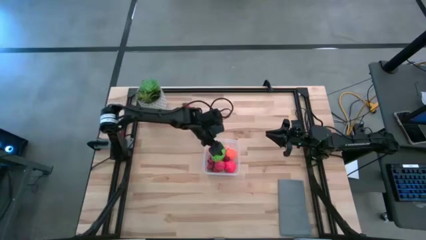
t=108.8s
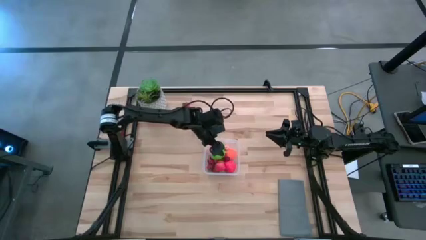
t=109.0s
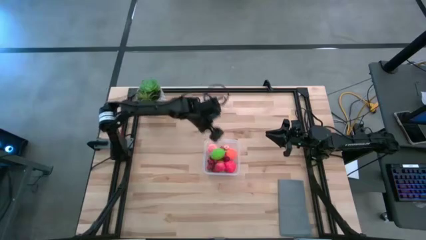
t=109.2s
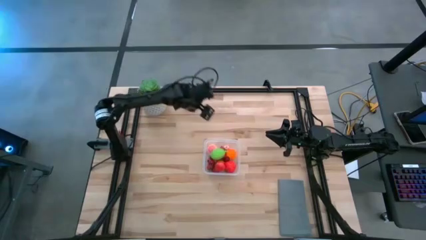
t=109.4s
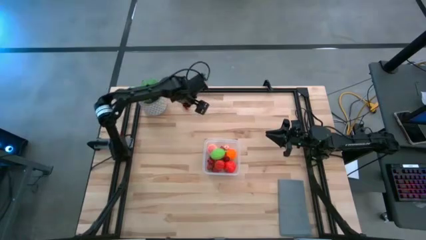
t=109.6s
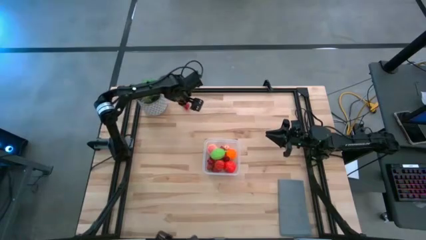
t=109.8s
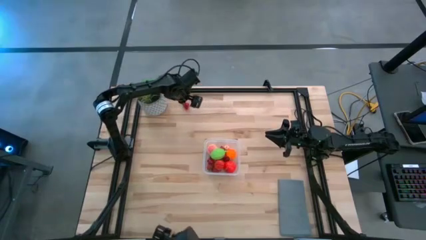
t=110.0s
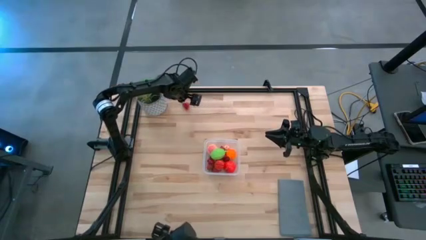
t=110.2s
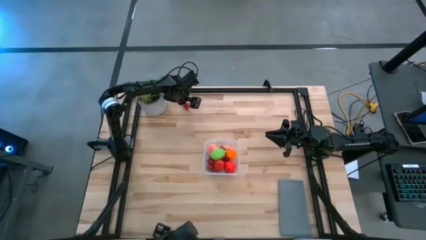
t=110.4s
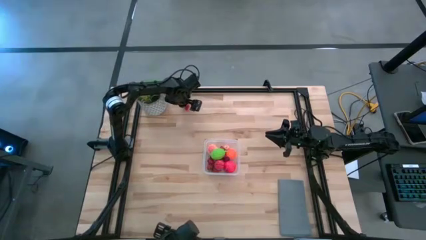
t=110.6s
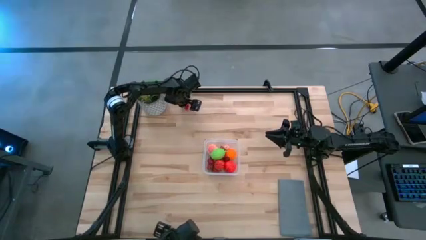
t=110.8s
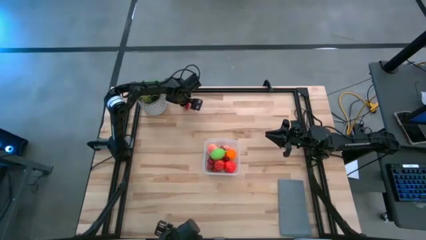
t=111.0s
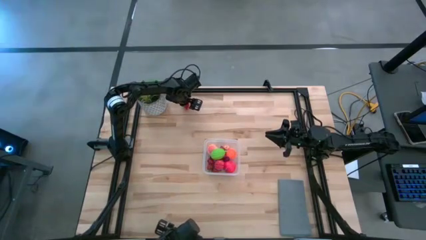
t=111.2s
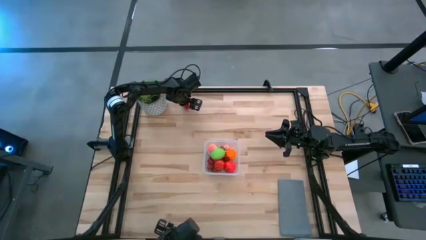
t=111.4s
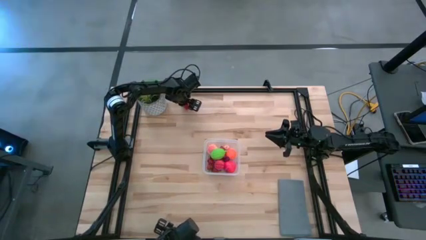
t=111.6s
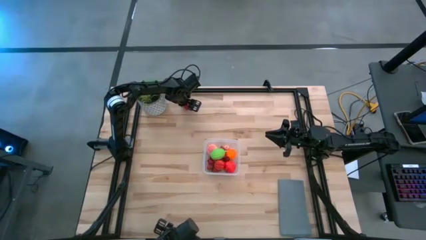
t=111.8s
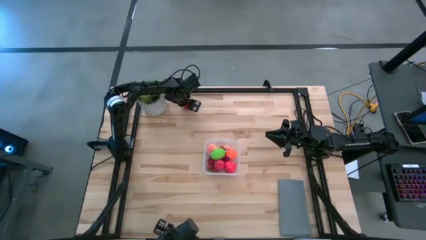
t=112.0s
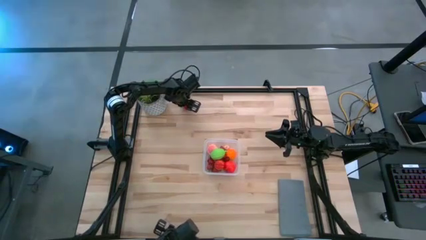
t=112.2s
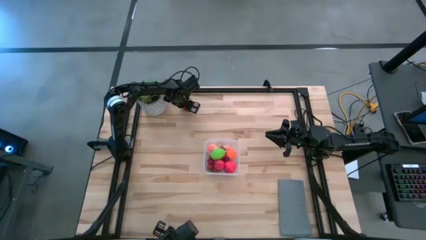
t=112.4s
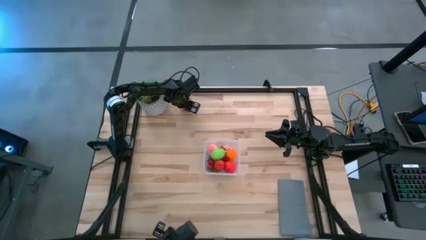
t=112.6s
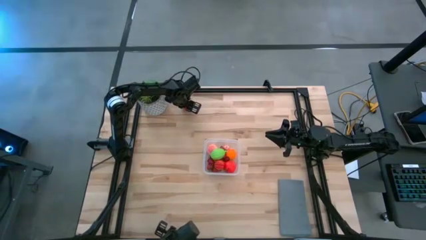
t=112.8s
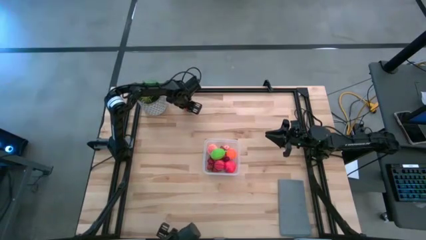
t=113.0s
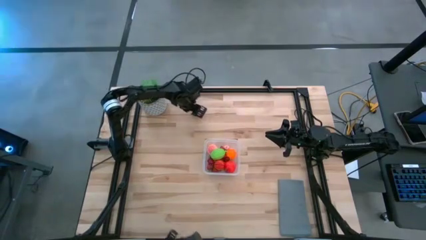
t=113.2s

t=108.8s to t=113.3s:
Task: Pick and placing Produce into tupperware
Put the red strawberry into the transparent container

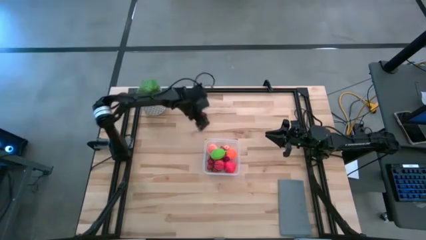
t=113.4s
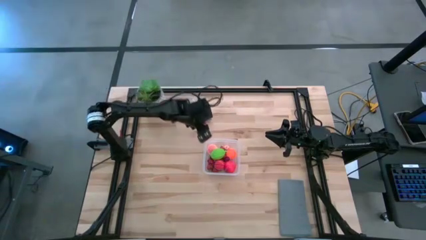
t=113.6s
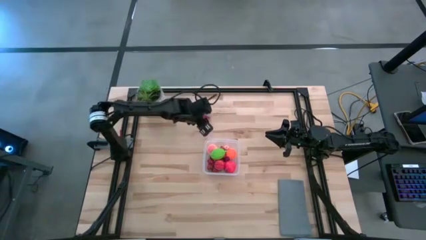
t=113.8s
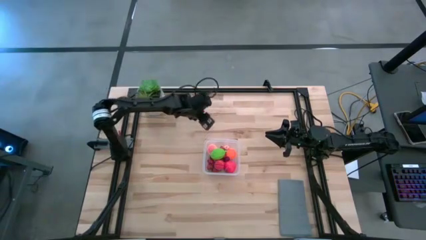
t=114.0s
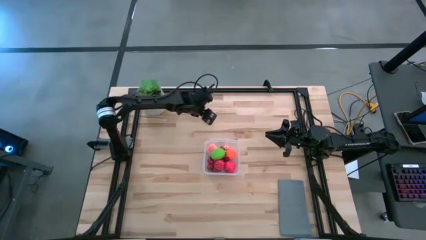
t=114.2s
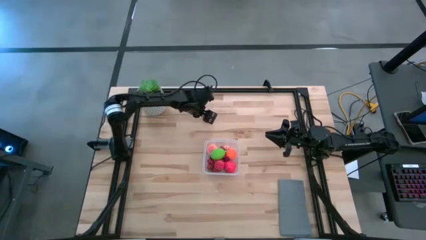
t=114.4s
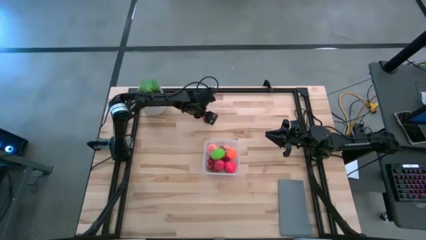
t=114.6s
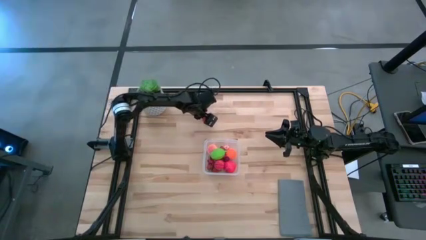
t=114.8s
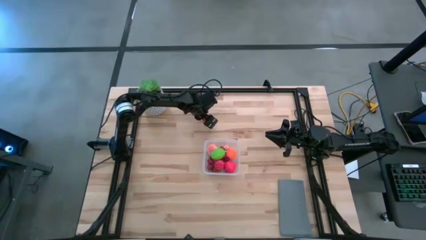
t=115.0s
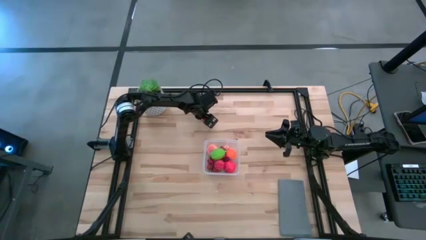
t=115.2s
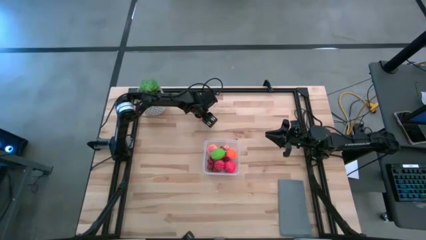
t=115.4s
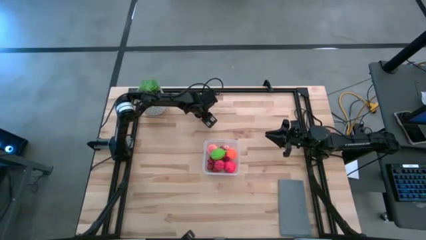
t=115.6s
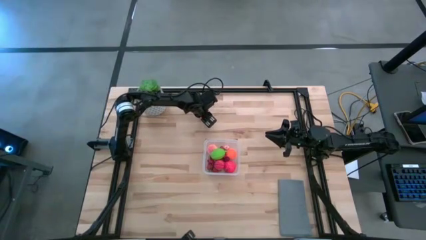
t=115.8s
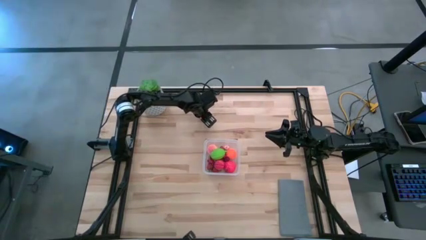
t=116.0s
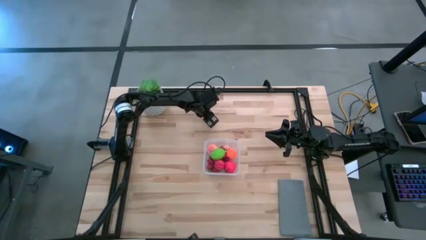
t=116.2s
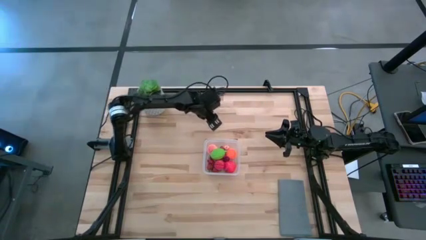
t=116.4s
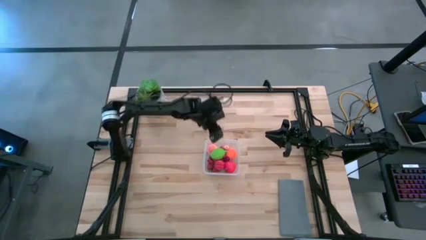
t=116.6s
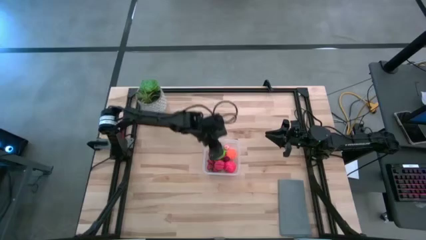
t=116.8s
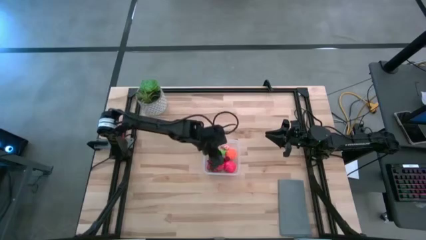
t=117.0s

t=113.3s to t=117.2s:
Put the red strawberry into the transparent container

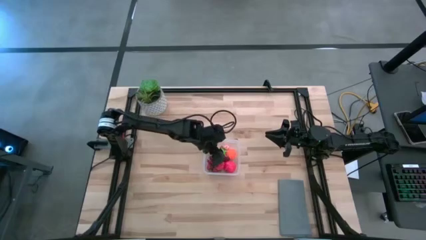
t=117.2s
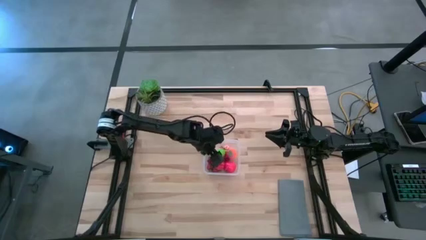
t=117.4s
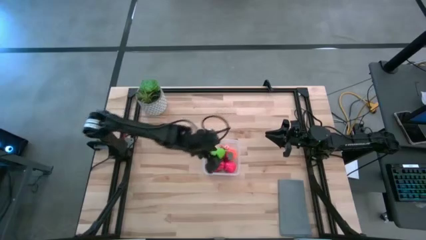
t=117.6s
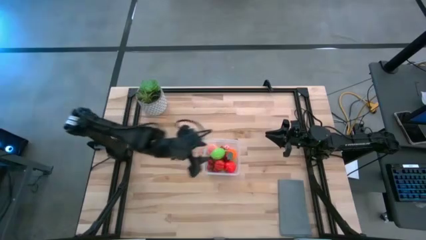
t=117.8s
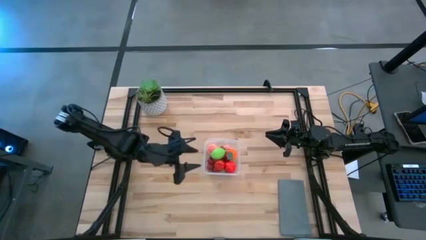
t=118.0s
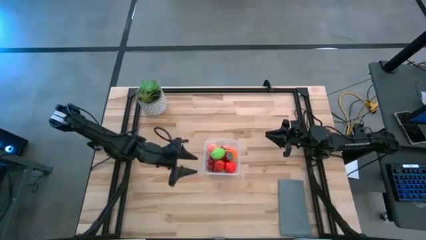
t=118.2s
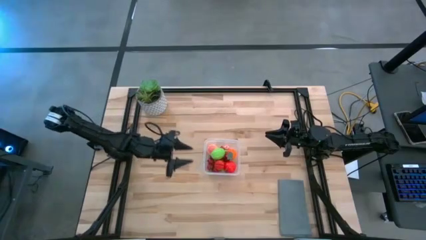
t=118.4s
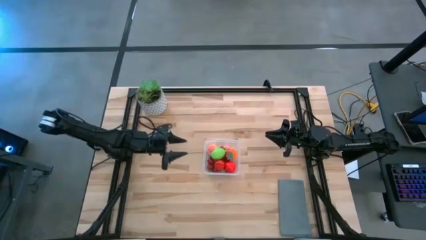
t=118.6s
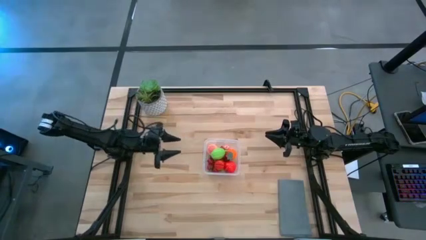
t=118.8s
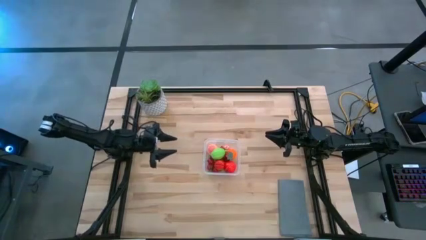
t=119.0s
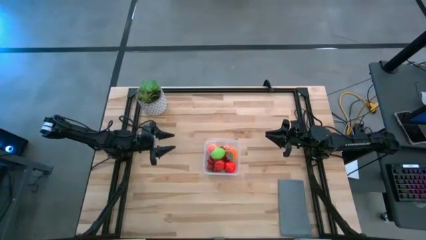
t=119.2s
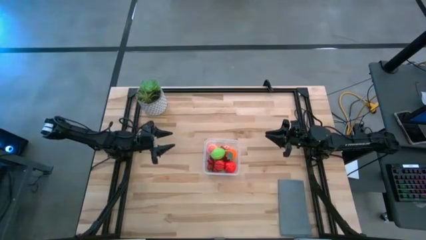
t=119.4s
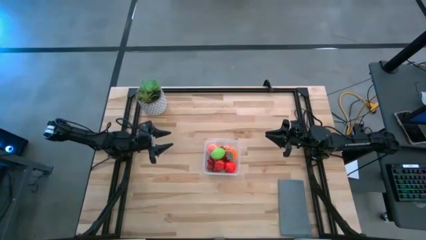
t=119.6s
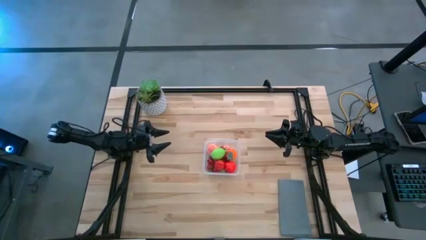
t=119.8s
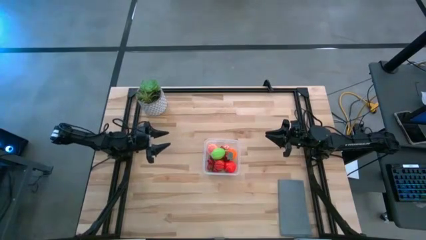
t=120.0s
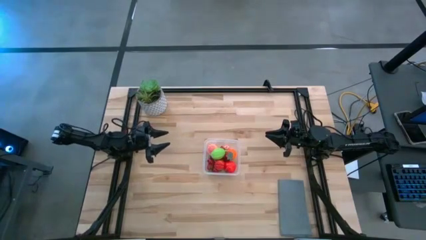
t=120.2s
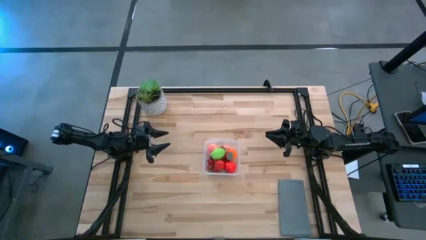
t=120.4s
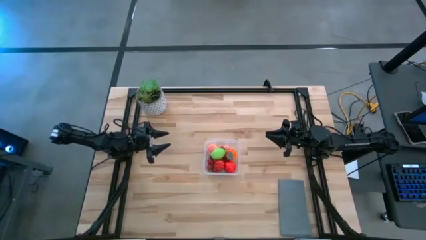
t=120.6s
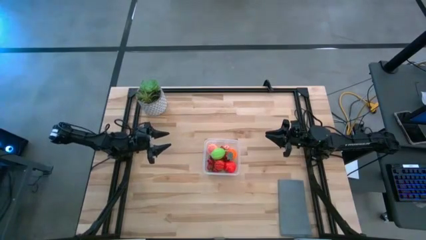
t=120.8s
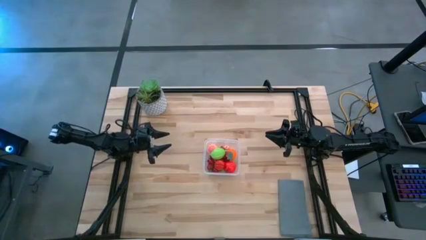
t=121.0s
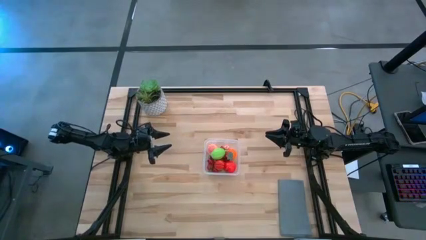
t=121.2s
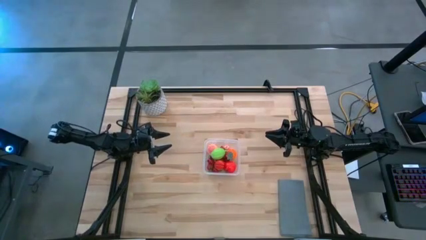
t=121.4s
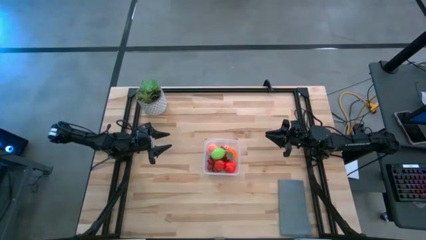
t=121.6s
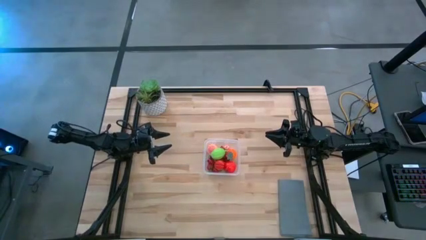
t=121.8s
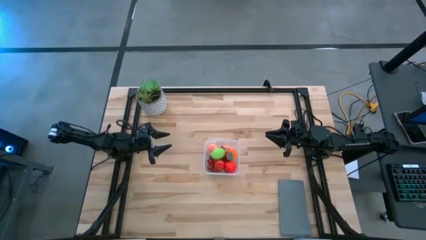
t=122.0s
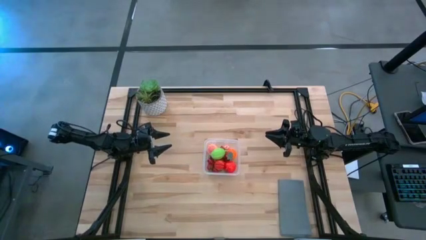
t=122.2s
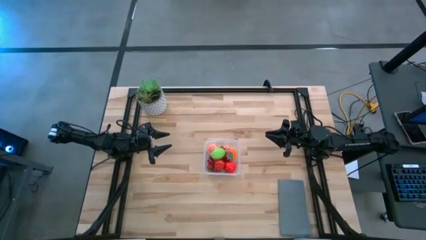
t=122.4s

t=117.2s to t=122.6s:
Return to Home Position

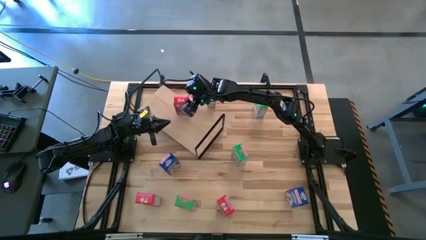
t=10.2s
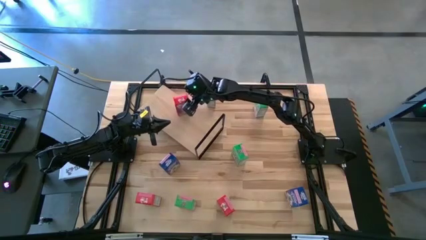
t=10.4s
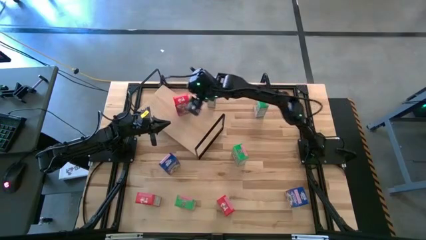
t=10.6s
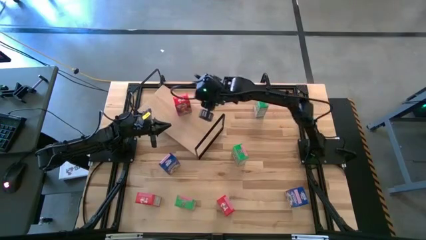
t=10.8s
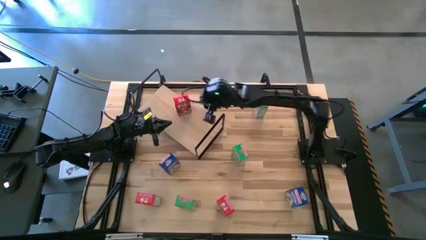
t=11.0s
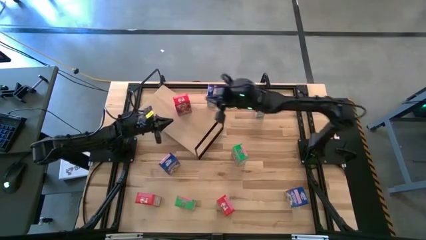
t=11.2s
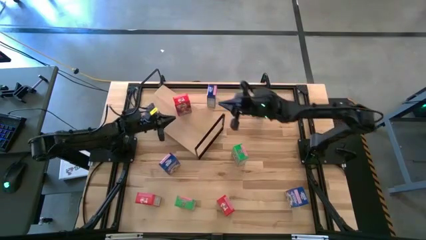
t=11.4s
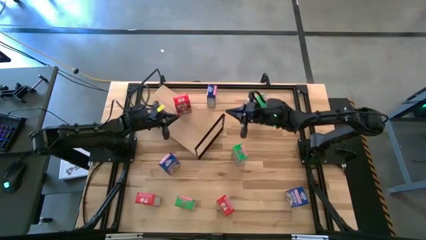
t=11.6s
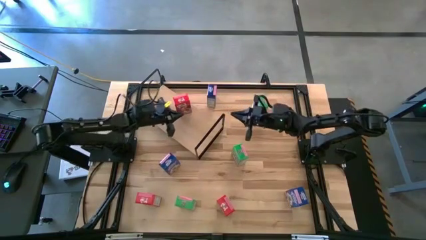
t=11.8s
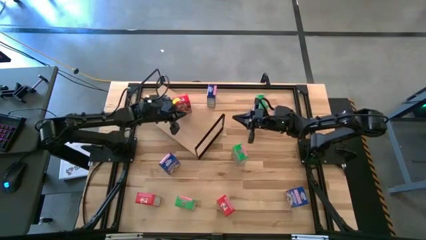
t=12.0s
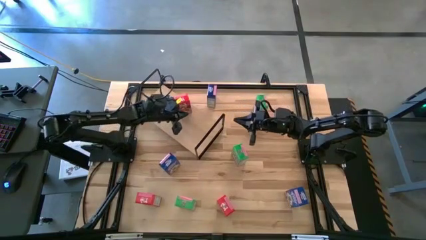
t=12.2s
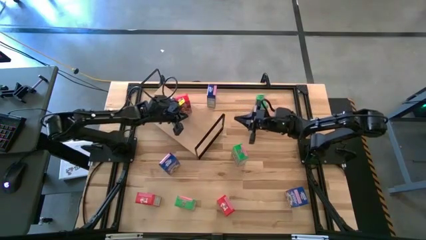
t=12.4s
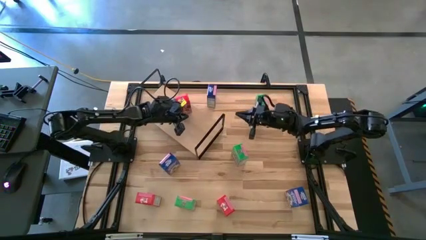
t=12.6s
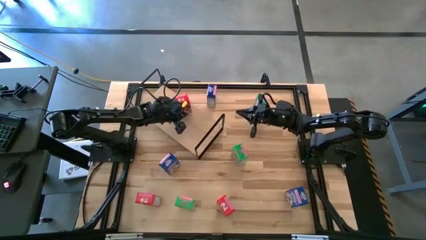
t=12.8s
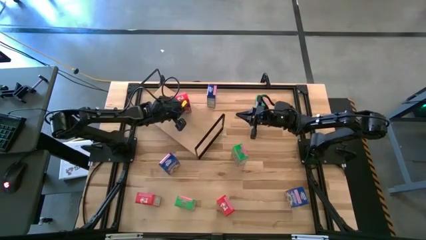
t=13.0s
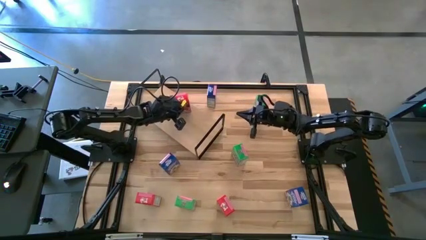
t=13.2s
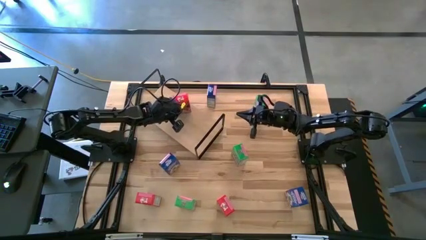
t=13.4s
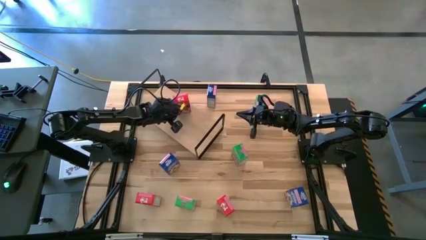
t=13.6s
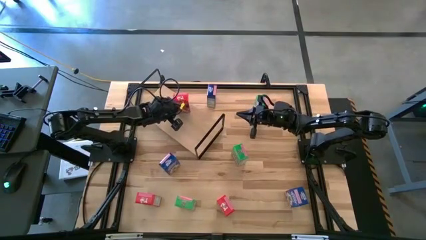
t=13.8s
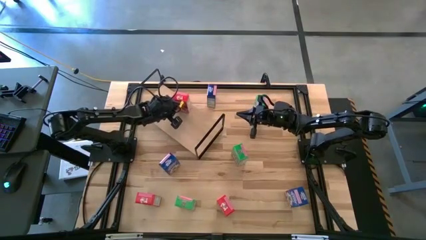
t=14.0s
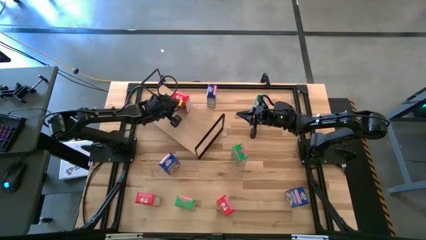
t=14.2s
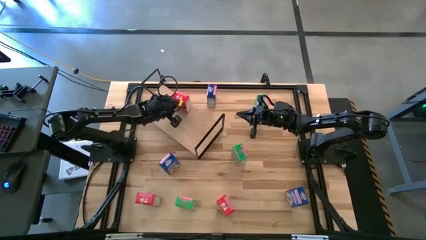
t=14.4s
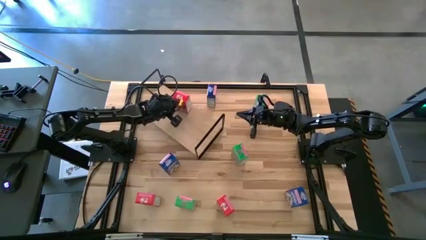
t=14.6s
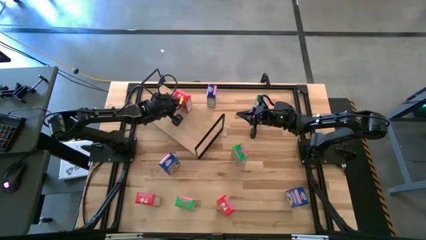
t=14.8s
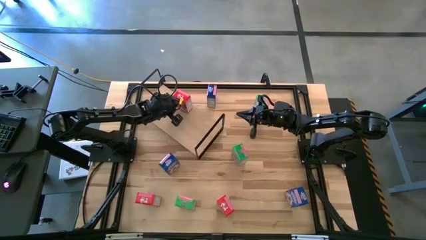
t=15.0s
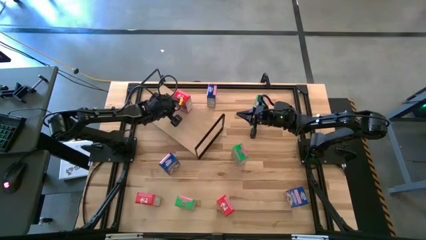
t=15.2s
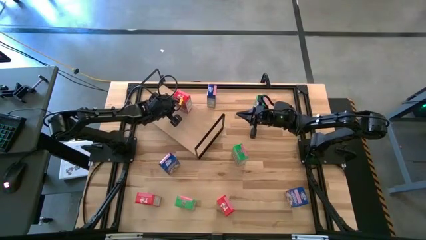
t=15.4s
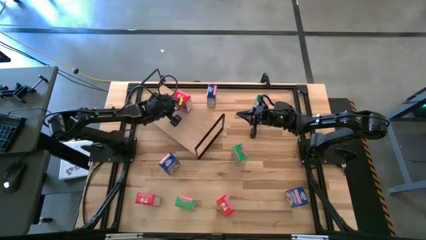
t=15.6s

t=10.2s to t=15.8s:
Task: Stack cereal on shelf
Adjust the red cereal on the shelf
